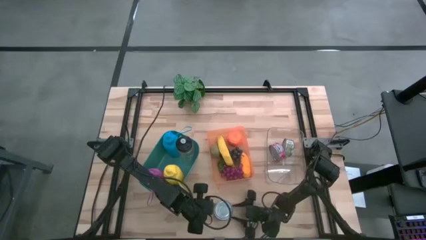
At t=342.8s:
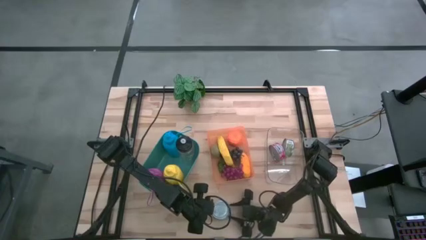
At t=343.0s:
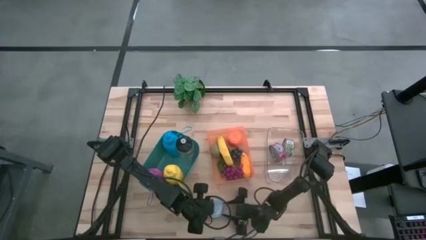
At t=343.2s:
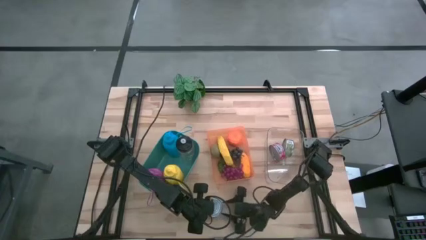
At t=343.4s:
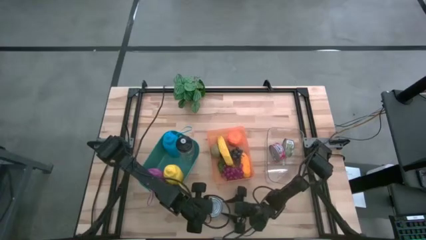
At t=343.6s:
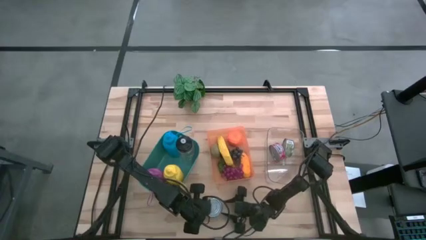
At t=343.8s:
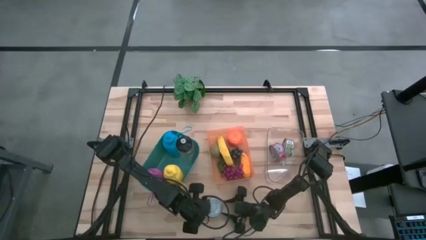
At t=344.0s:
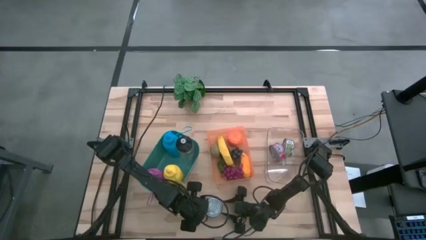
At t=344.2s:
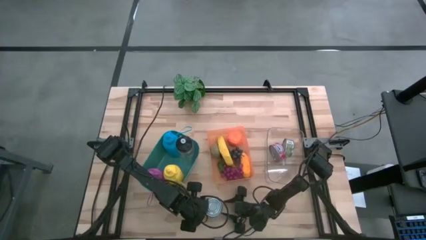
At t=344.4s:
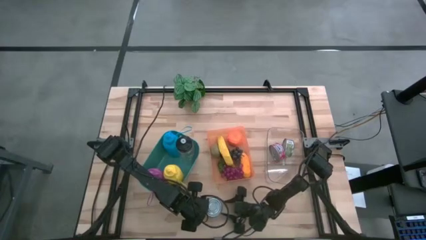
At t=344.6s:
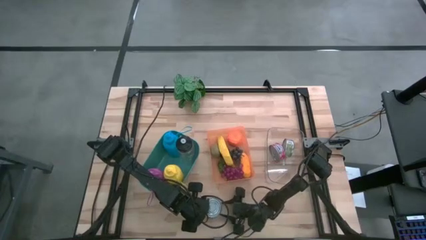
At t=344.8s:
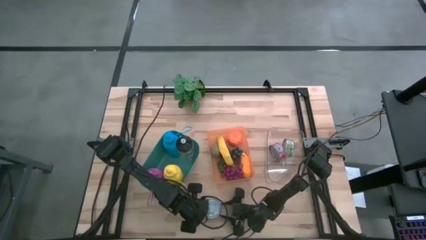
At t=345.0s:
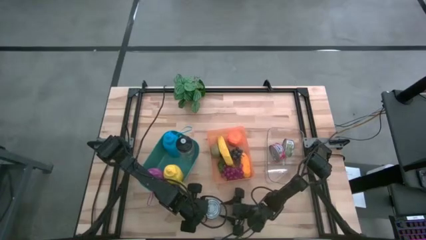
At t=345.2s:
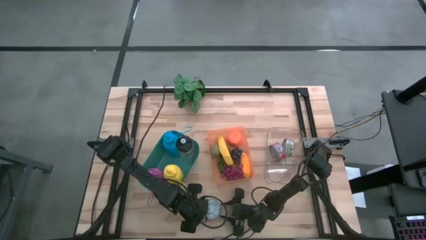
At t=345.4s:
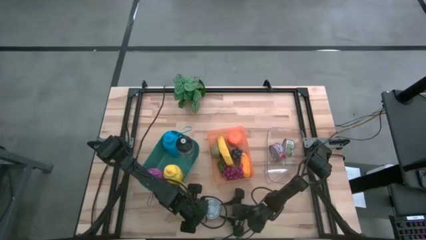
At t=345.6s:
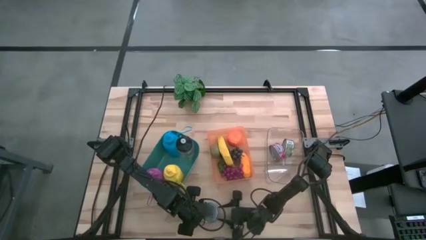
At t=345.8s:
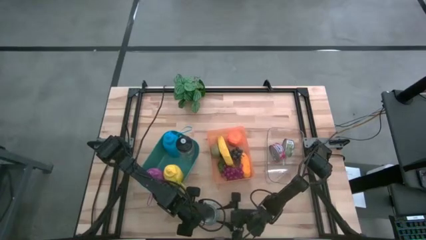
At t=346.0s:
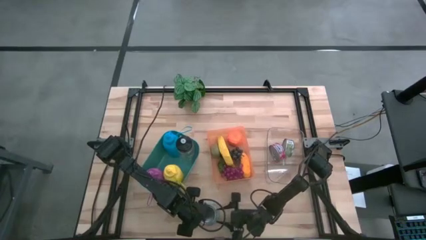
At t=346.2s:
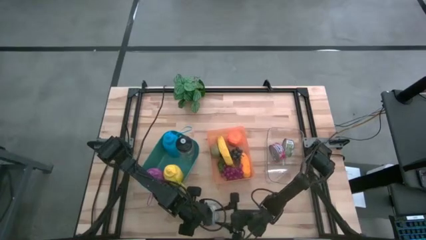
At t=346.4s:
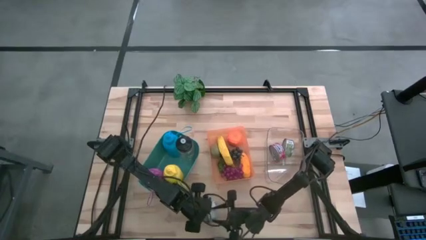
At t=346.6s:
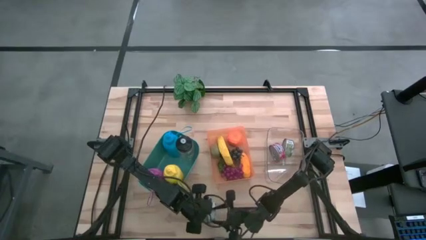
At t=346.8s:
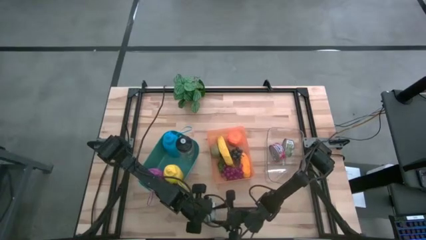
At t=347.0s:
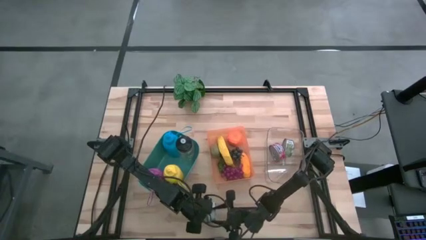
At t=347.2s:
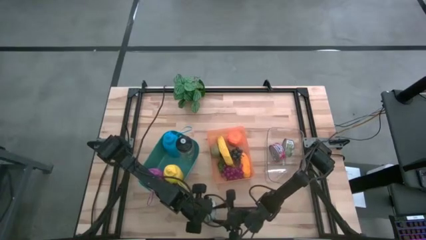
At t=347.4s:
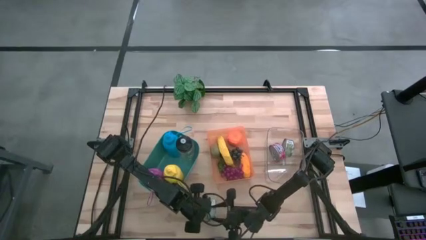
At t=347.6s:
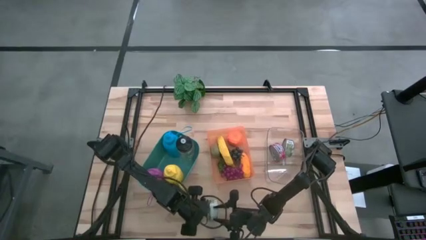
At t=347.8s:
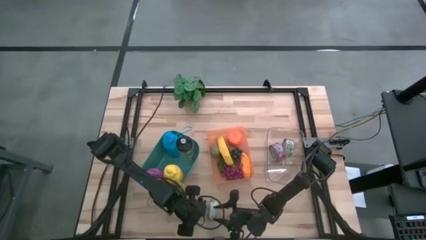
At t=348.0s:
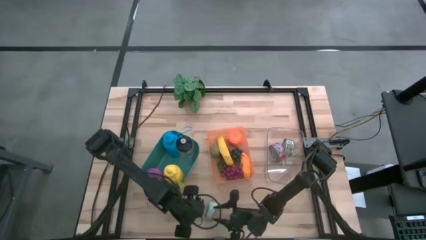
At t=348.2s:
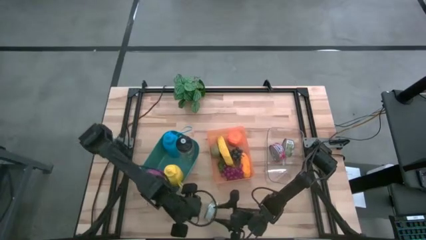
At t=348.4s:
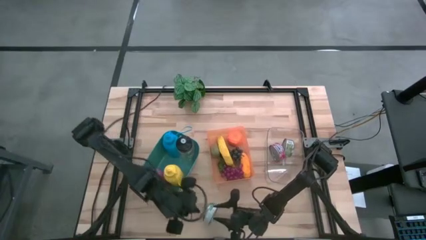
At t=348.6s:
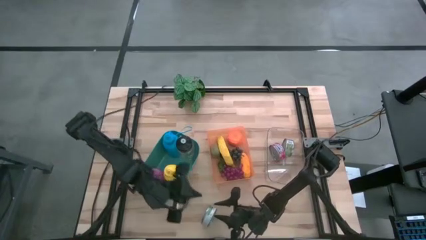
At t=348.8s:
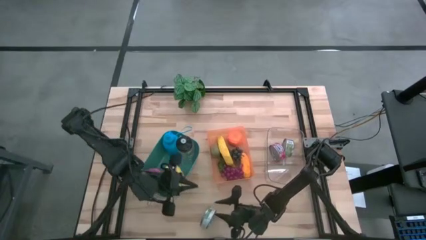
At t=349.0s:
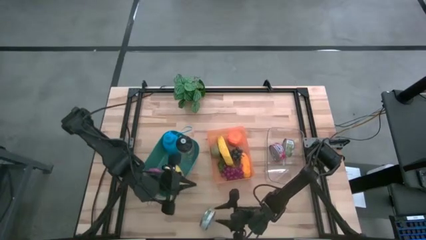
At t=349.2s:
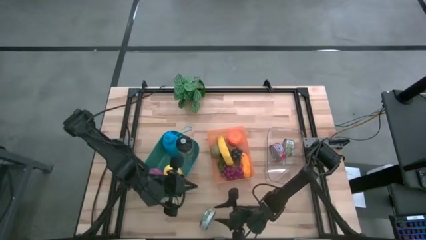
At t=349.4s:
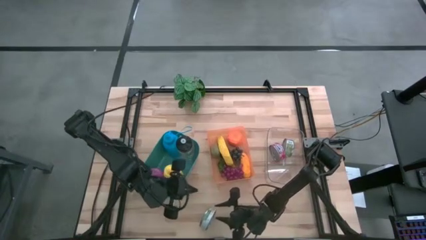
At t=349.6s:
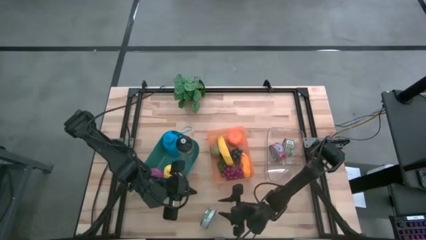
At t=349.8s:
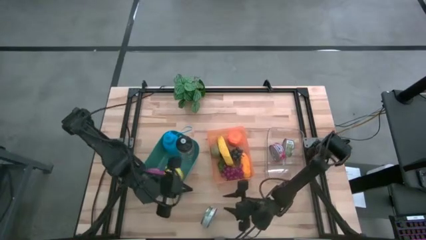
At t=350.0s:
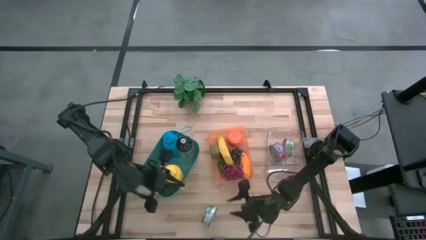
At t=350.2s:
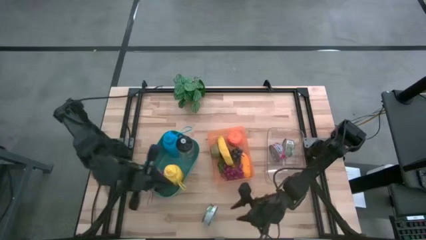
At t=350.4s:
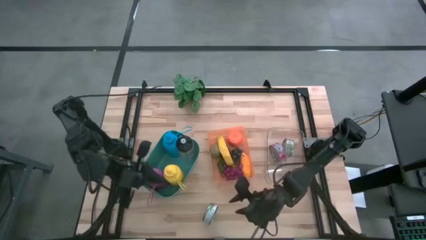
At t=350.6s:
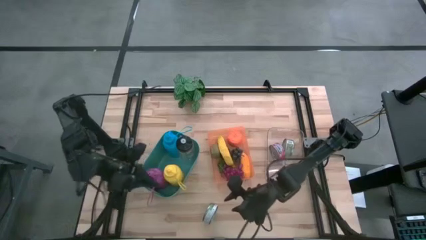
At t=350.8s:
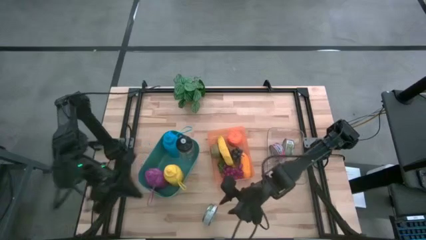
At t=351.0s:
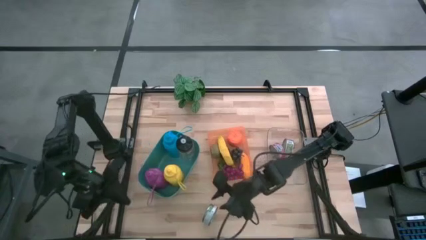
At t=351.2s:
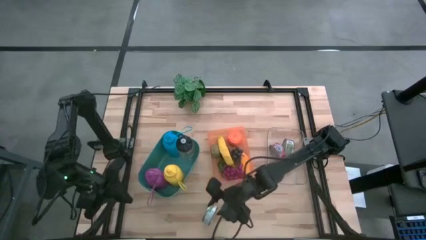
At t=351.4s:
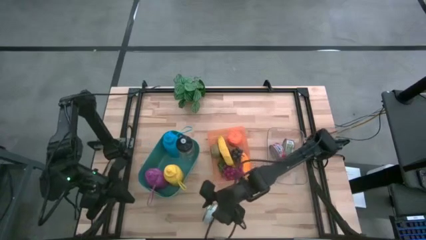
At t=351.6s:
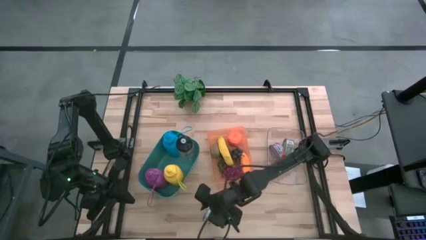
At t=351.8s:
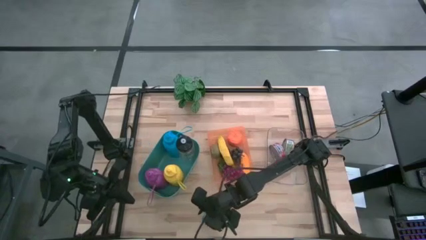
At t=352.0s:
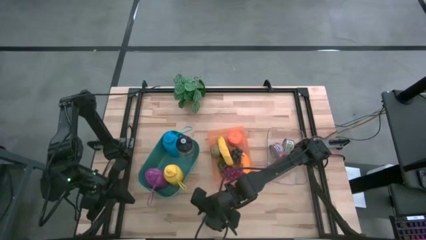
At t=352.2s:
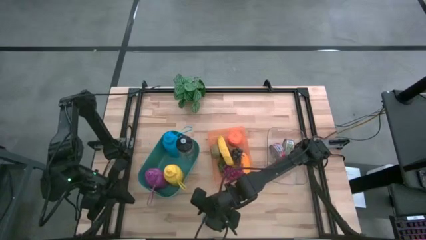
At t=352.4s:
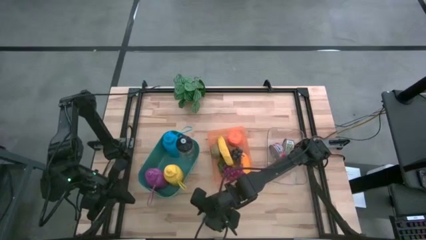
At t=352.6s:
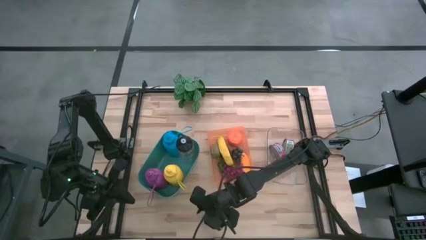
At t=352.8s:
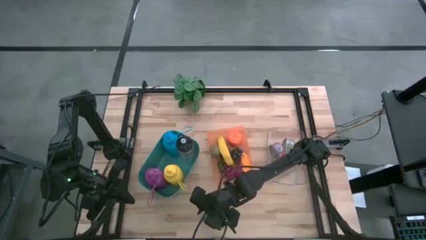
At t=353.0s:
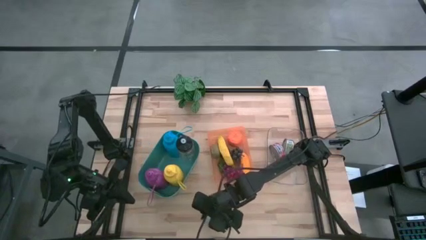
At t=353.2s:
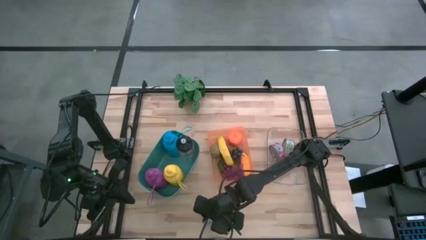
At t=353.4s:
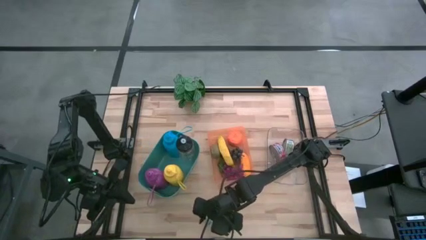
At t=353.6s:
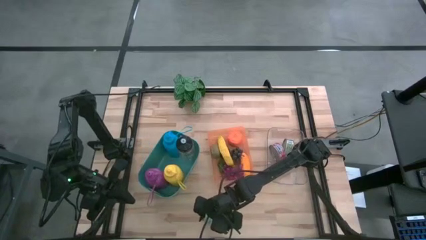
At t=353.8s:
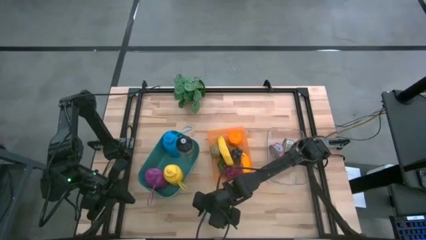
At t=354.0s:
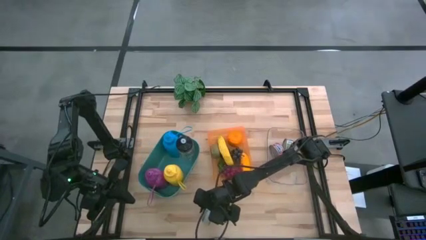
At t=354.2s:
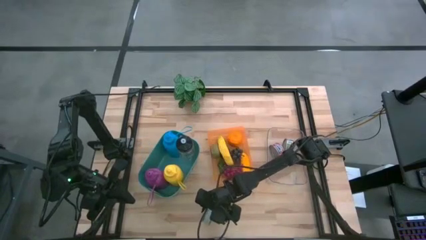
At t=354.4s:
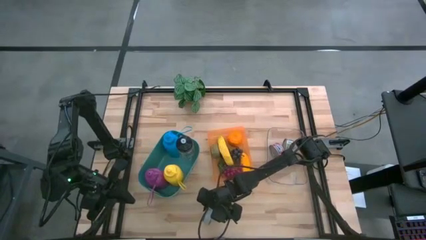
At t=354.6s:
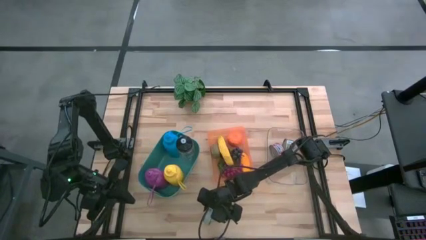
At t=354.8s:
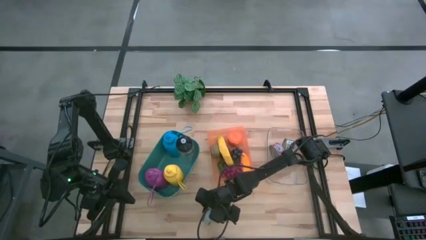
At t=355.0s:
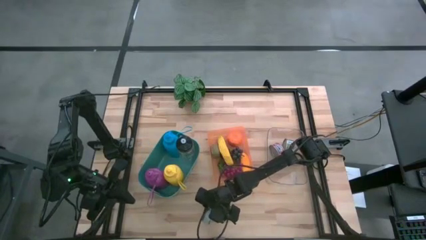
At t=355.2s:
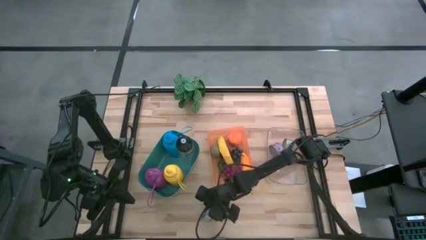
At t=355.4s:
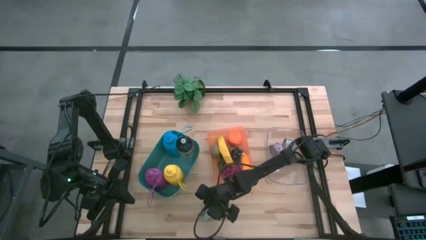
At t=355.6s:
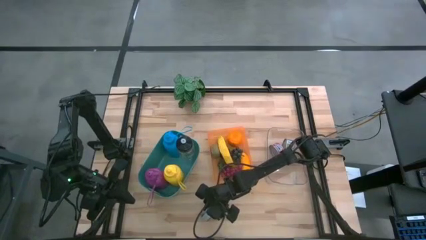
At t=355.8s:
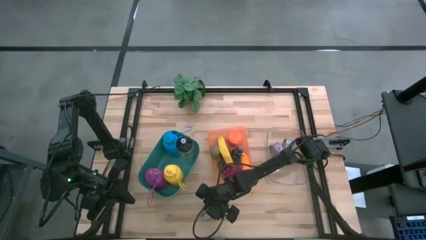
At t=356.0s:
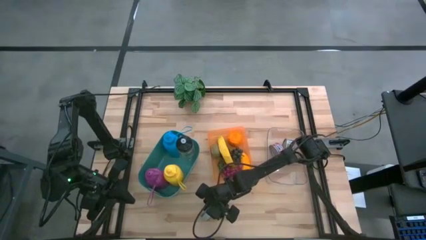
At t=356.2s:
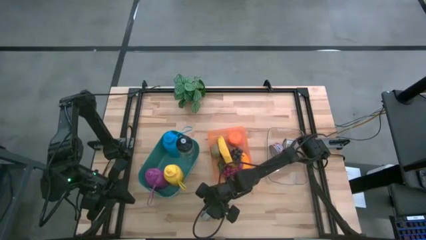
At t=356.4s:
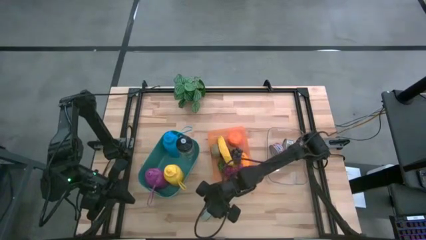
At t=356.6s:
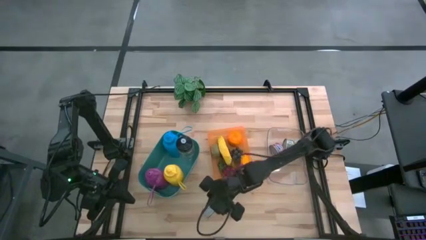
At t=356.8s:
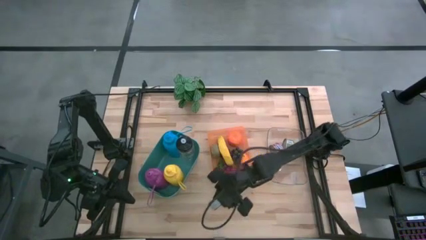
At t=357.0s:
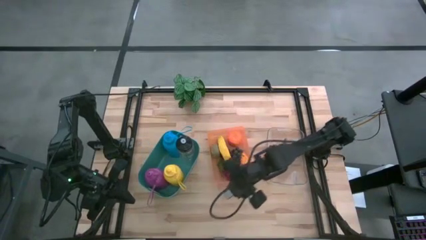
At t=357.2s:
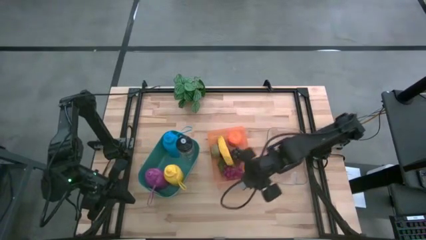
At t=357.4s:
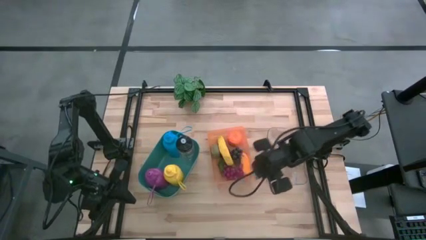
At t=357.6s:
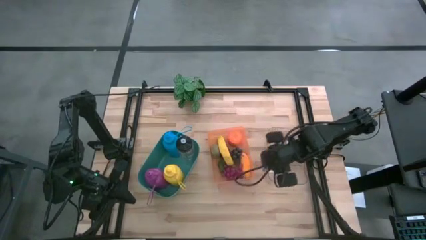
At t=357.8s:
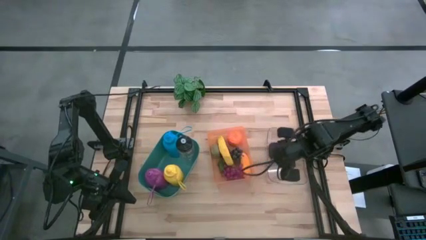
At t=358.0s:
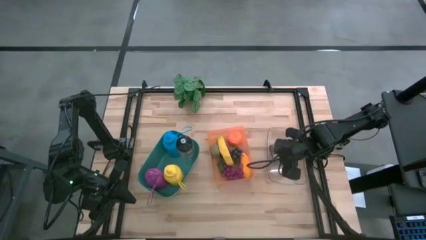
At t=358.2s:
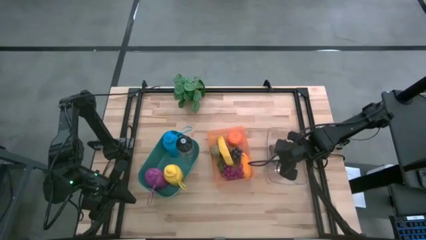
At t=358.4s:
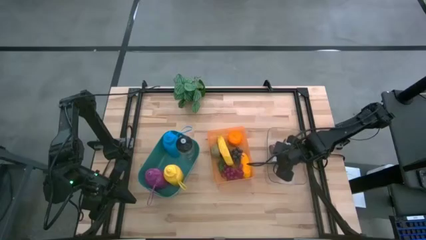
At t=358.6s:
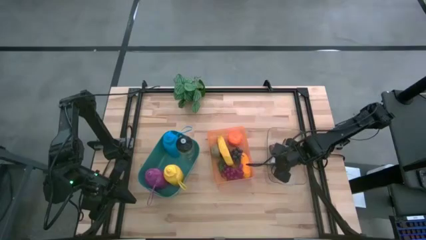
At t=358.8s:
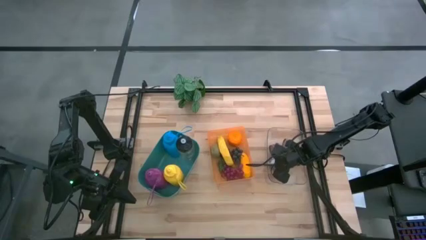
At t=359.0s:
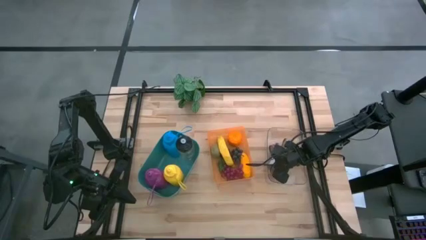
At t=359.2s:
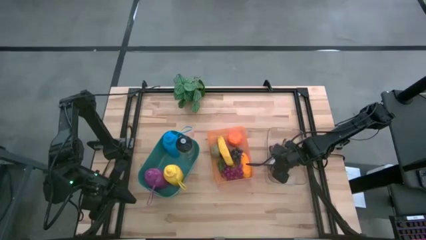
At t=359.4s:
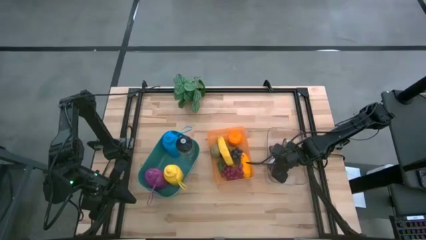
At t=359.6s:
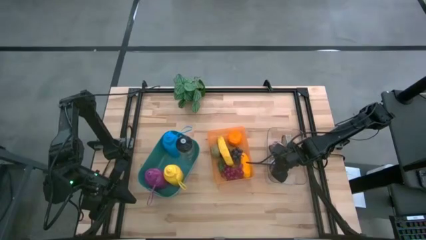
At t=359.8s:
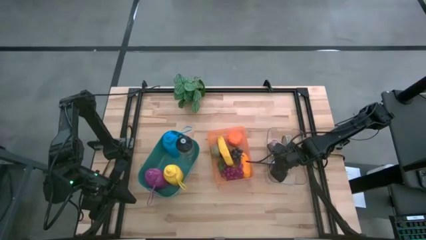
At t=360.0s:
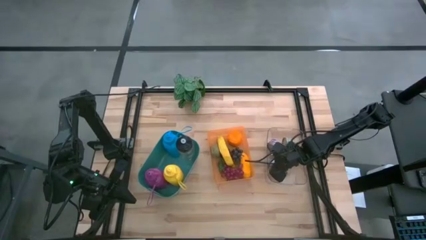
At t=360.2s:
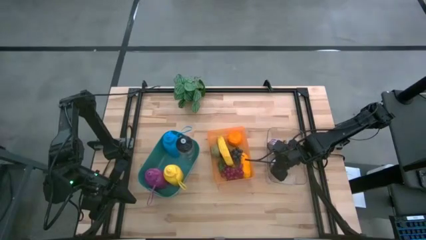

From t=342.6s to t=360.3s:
Task: Pick & Place Food Item
Put the green tuna can into the transparent bin
